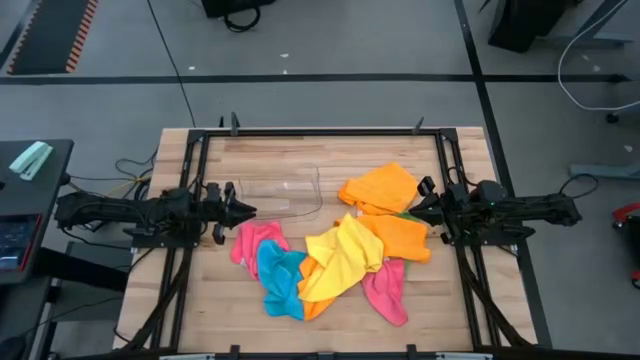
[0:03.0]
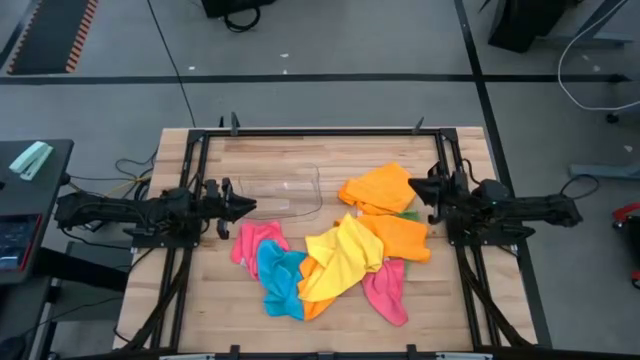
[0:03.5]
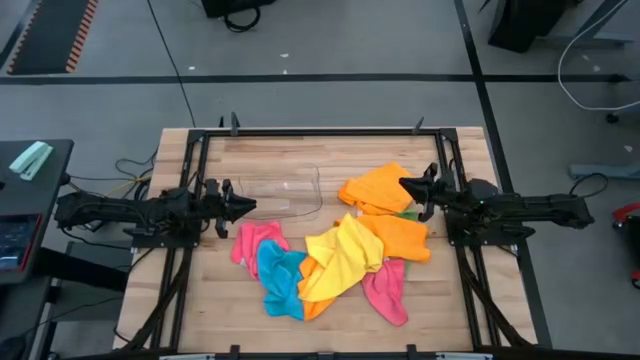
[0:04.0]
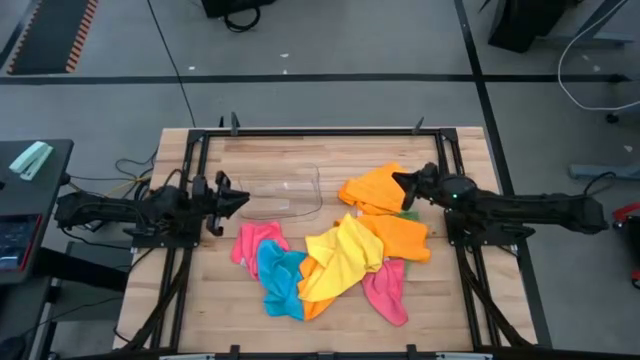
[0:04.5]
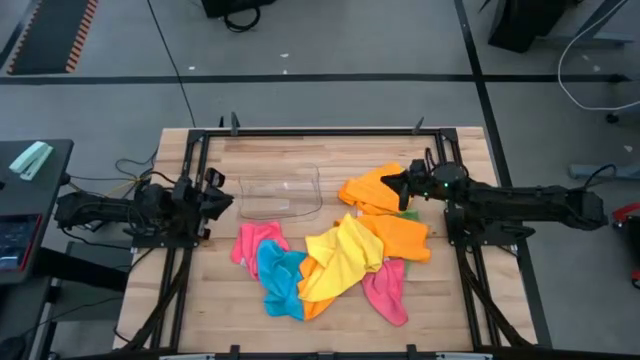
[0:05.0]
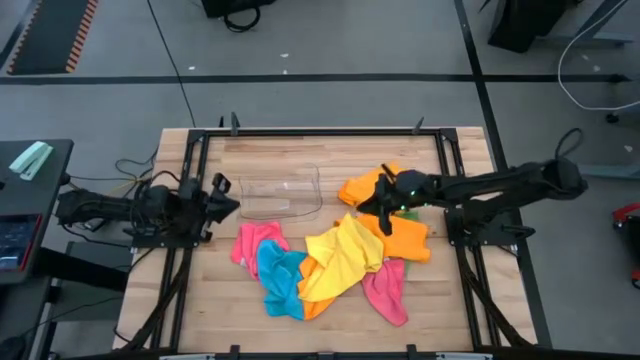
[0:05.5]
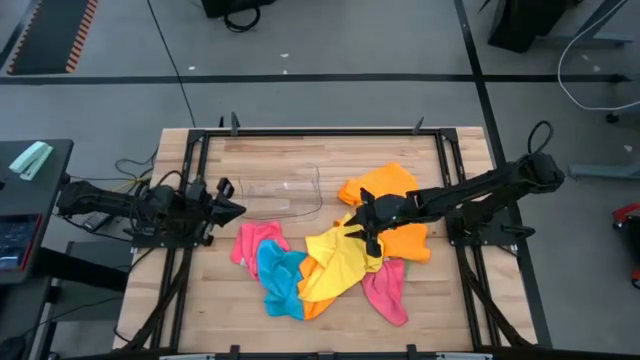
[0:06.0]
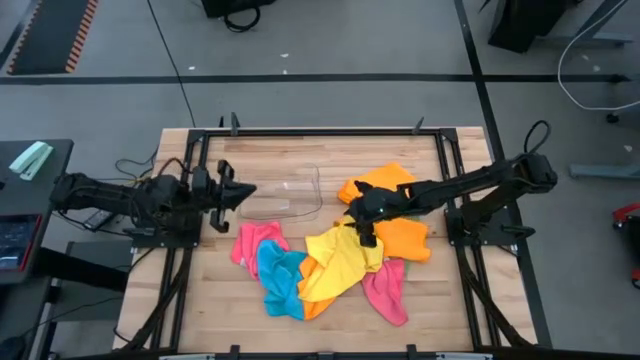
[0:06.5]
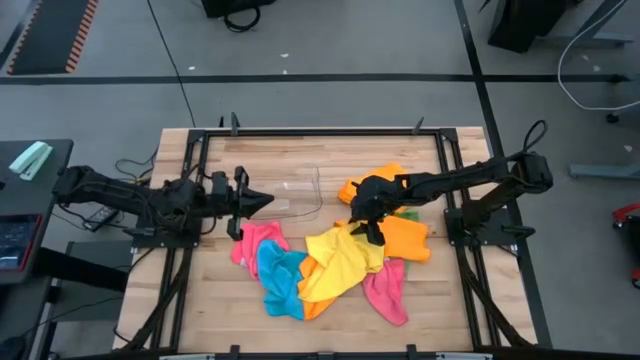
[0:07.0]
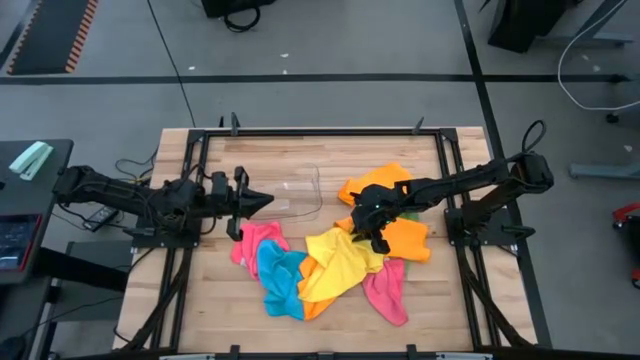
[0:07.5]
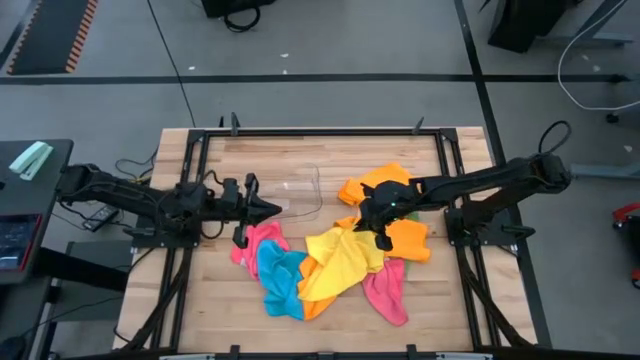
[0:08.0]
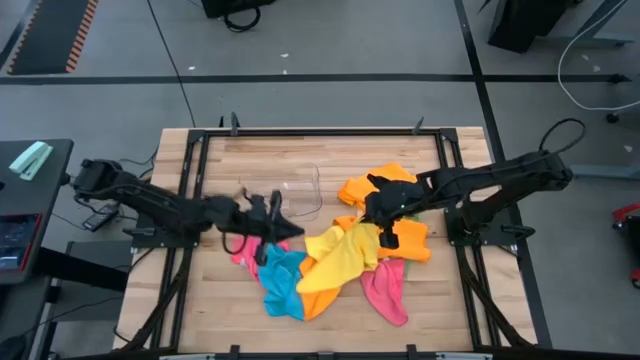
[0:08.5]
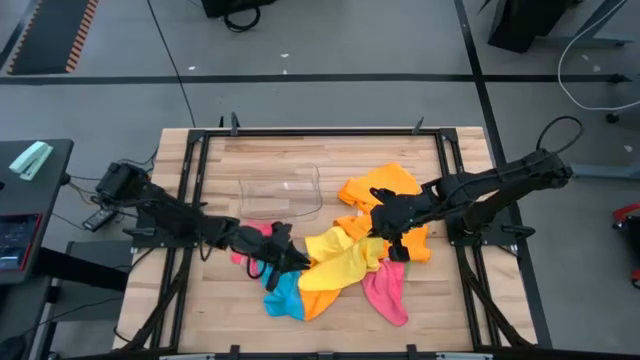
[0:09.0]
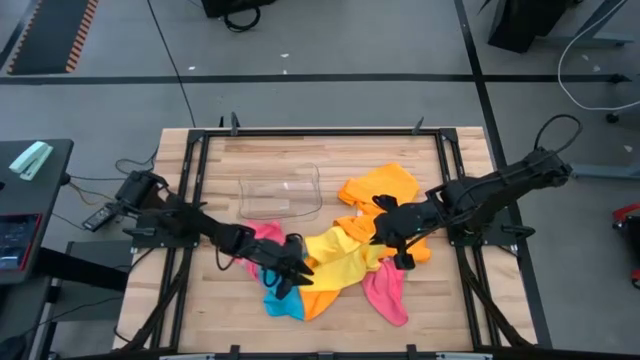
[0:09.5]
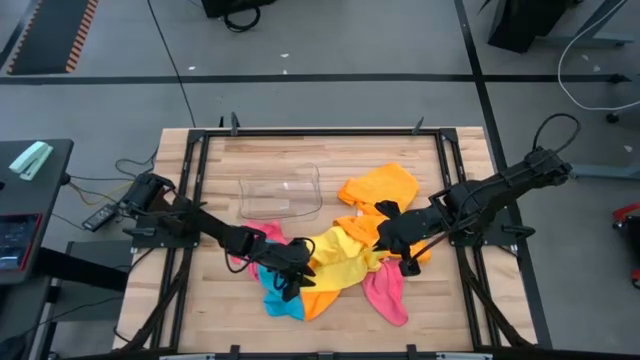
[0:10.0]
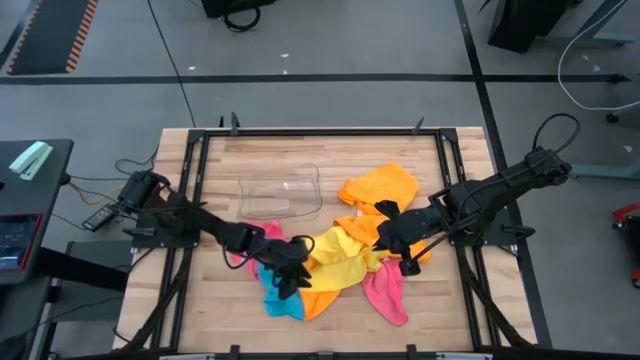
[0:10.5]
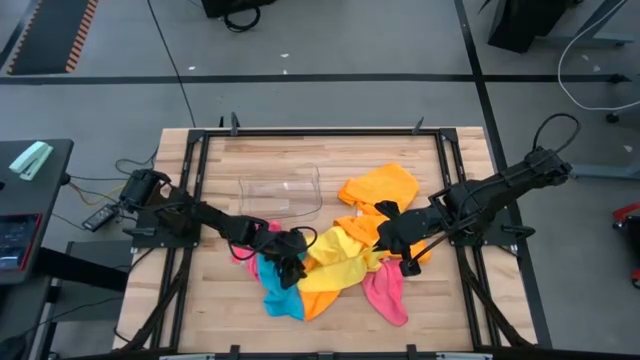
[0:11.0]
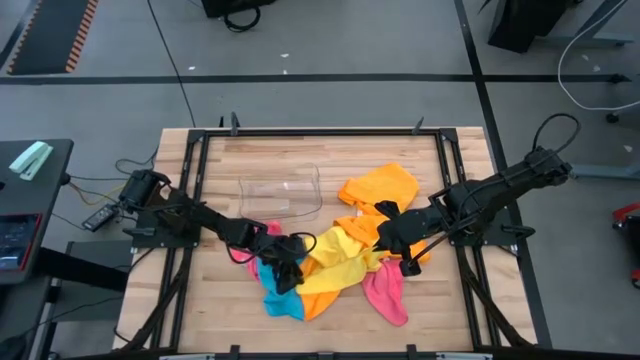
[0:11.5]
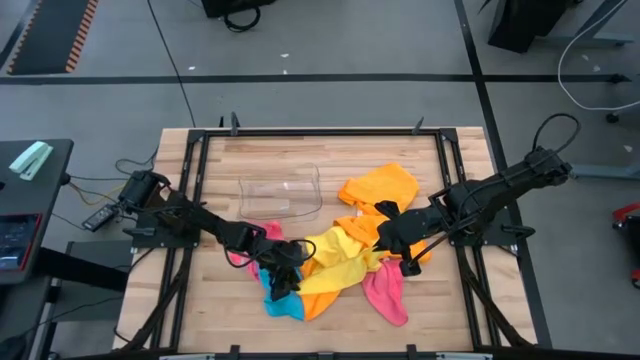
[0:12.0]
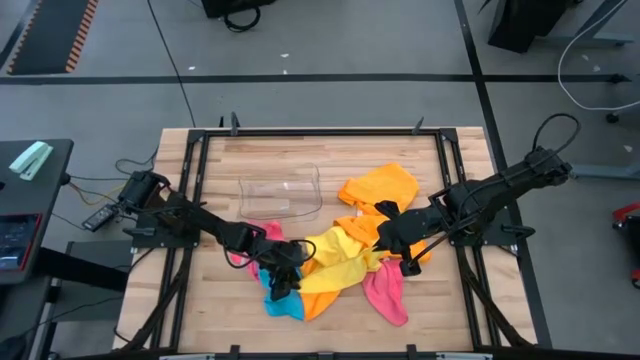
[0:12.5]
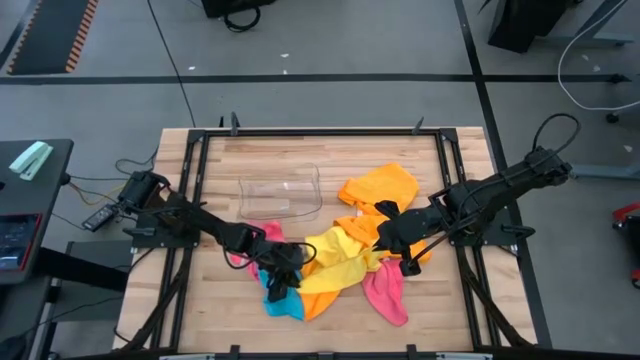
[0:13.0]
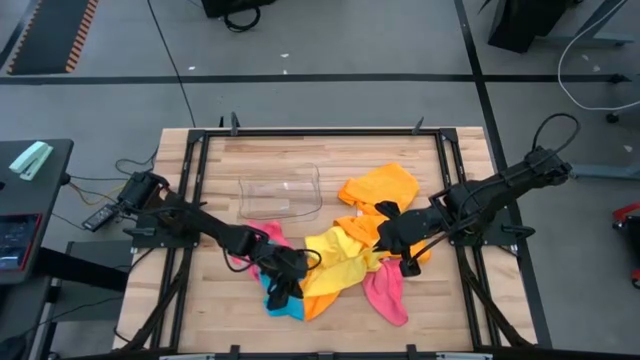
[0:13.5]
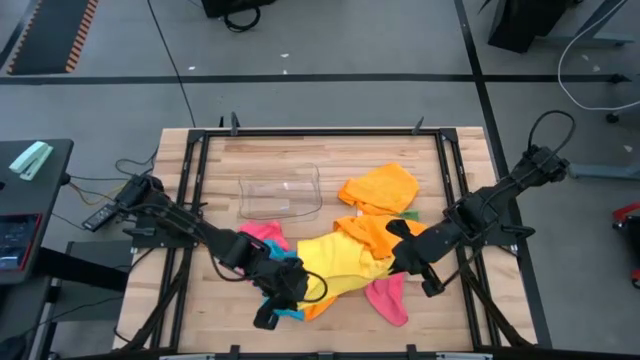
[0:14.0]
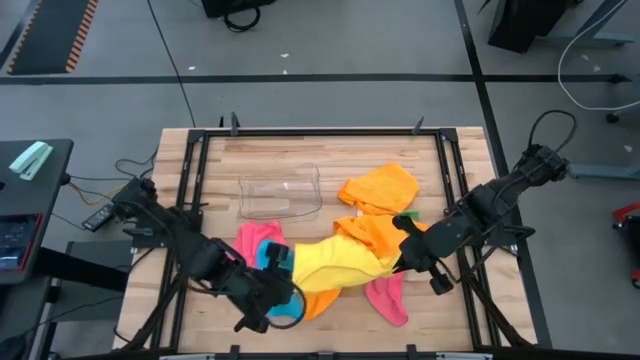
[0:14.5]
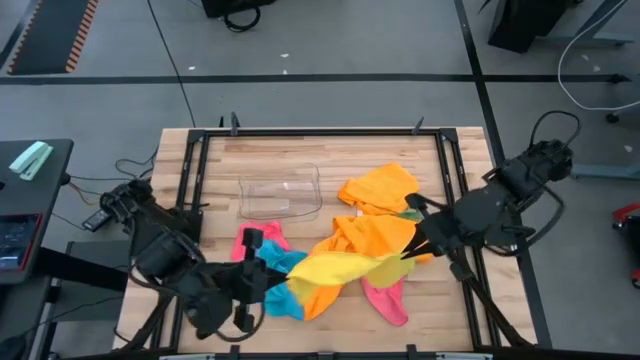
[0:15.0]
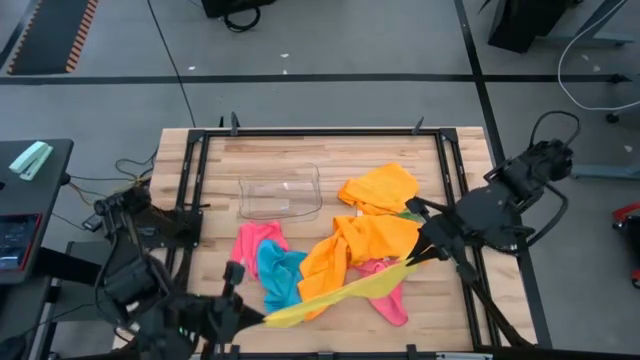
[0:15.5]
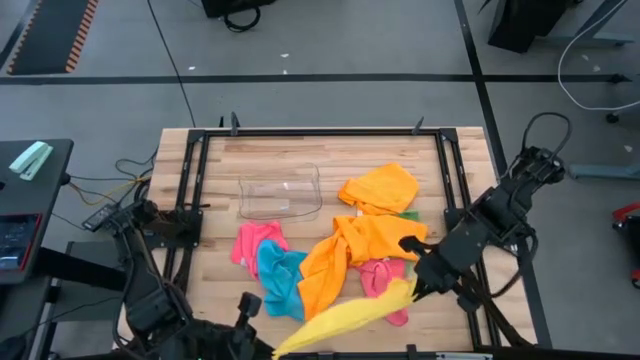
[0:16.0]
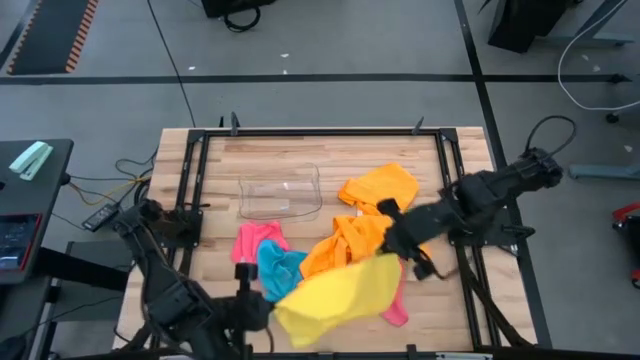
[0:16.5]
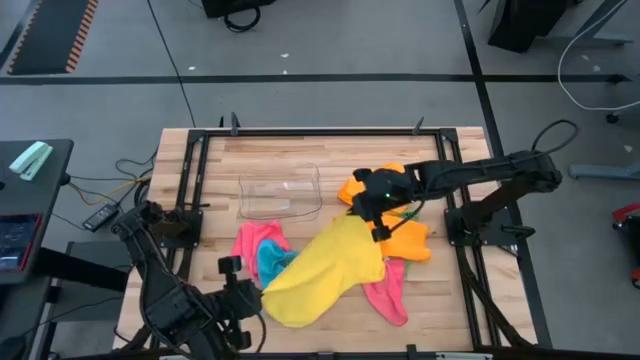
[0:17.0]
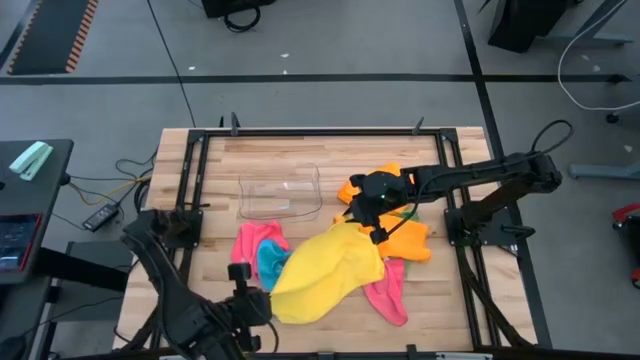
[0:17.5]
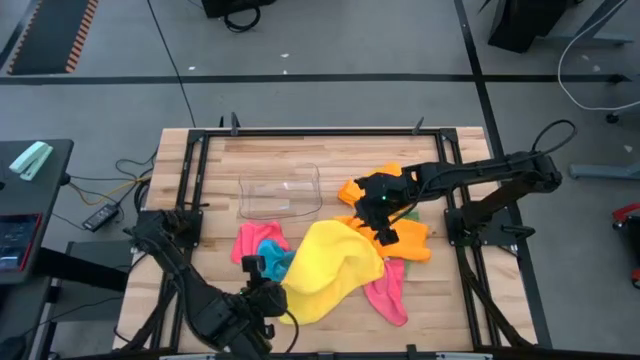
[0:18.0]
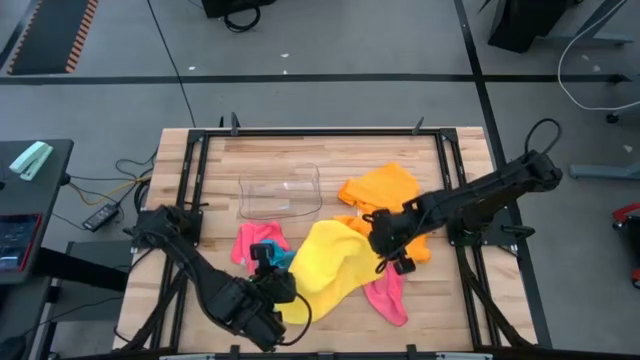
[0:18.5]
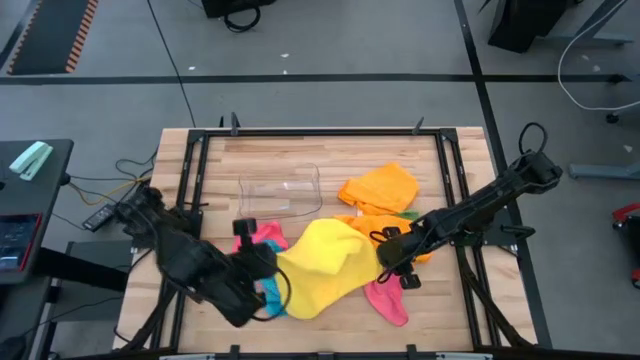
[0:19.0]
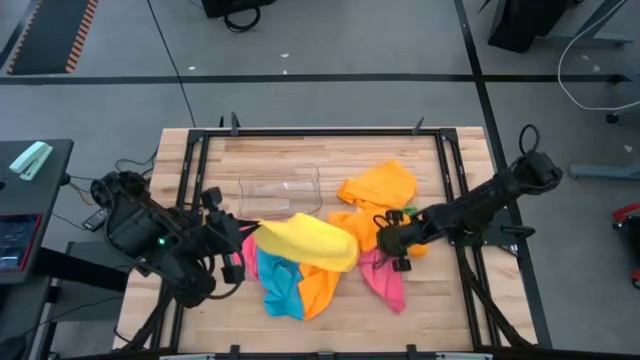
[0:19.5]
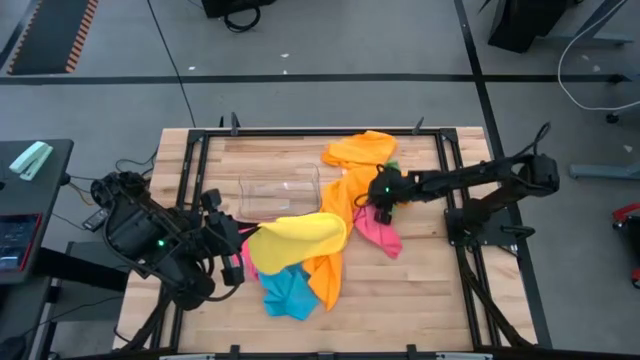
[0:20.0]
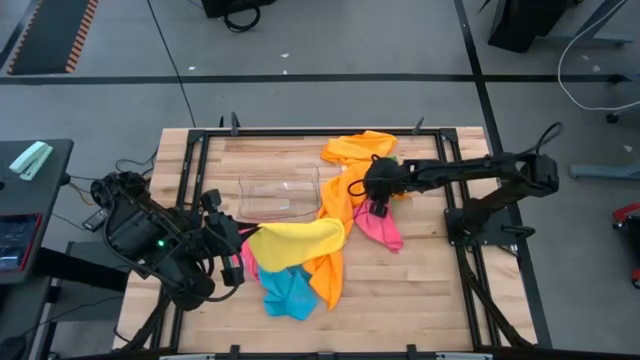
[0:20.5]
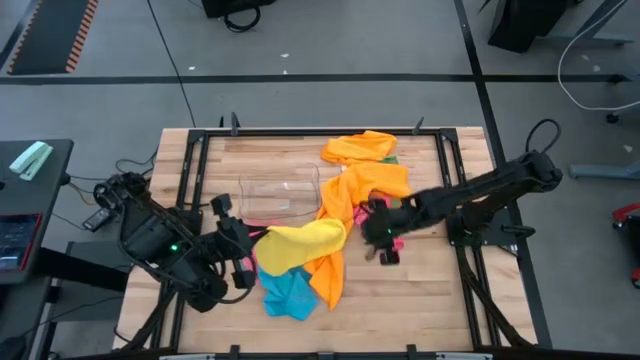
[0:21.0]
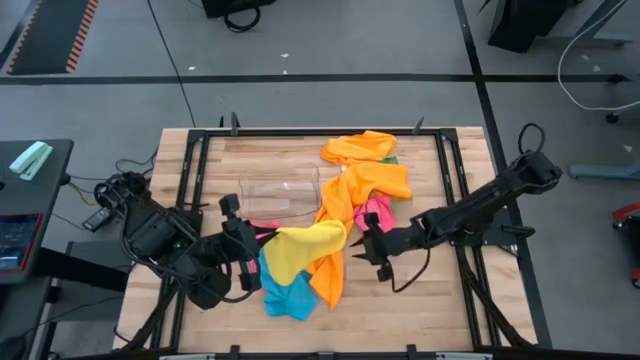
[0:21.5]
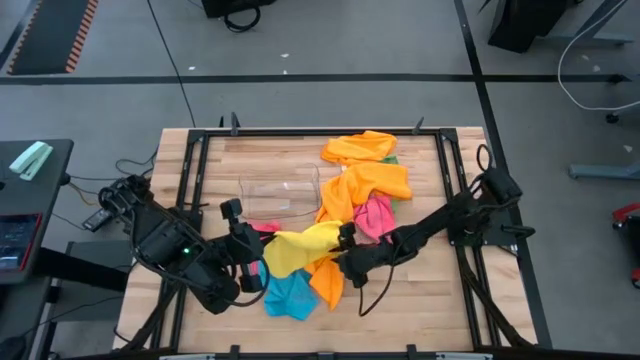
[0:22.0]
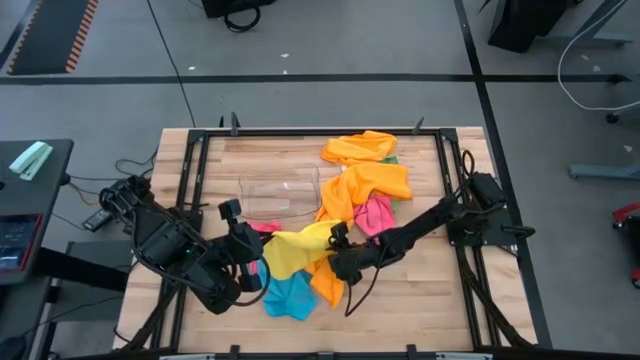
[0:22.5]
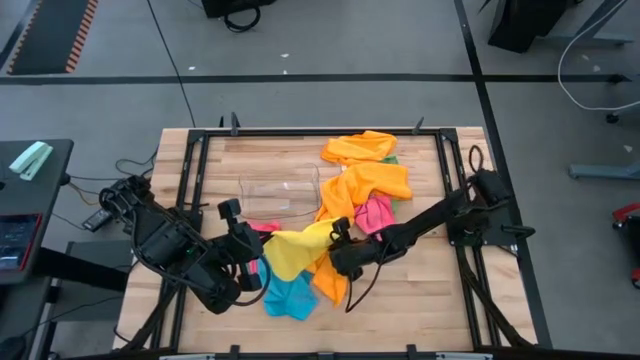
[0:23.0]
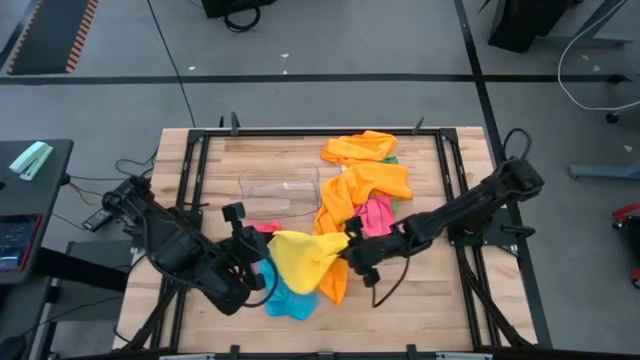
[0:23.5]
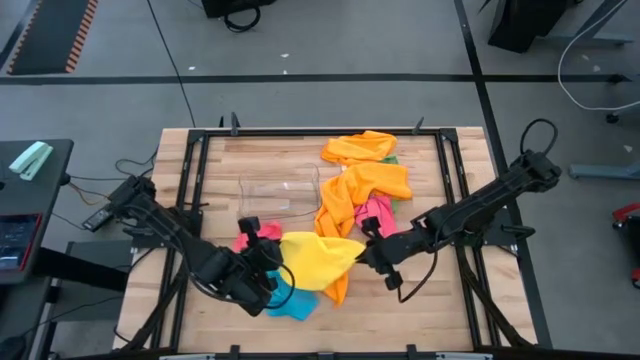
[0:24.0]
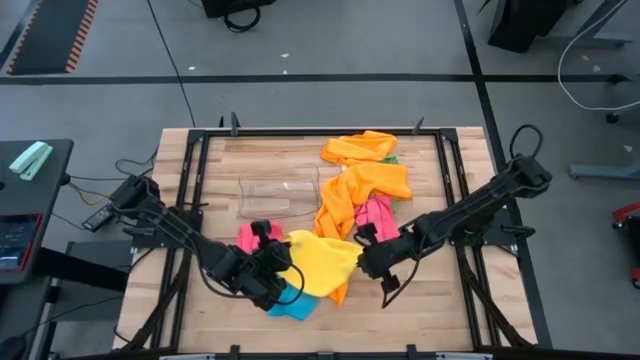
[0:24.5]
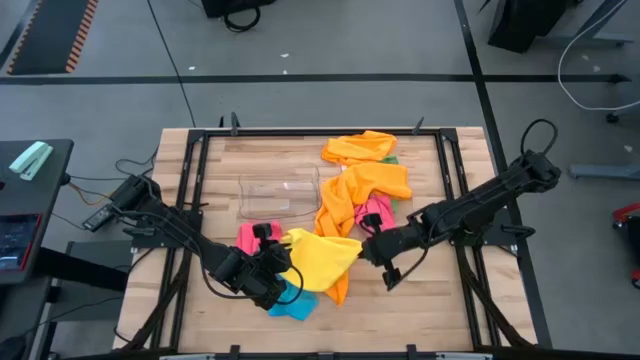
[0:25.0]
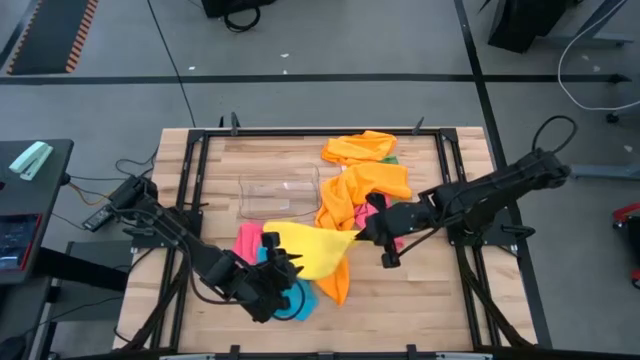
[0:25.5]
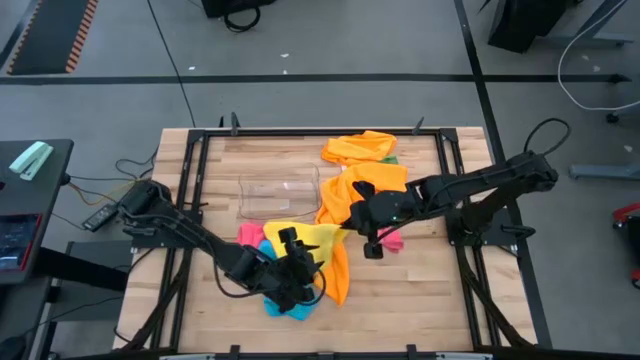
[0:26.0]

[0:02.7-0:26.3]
Task: Fold microfiber towels
Fold the yellow microfiber cloth
